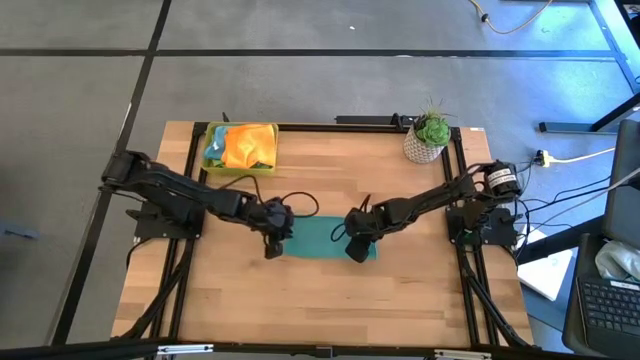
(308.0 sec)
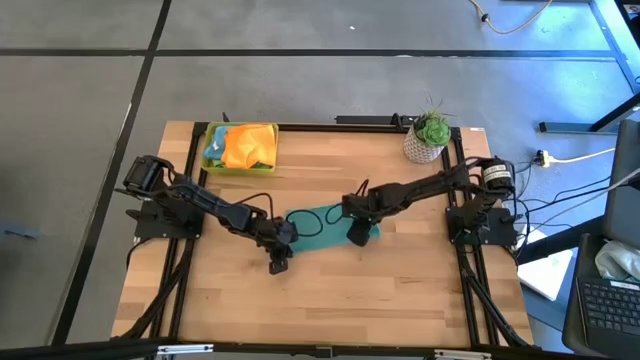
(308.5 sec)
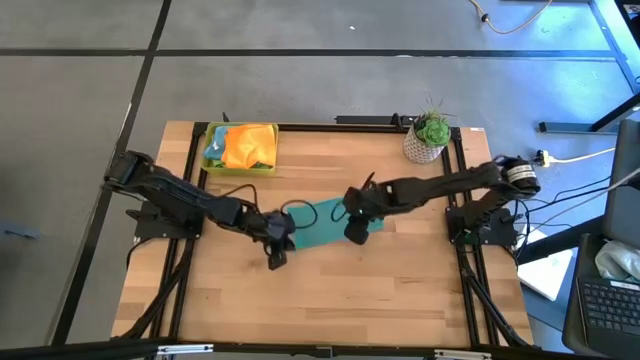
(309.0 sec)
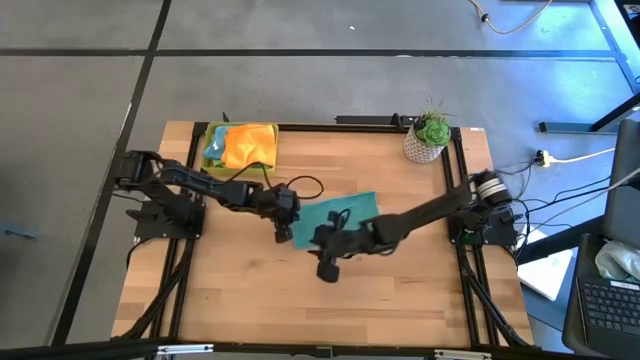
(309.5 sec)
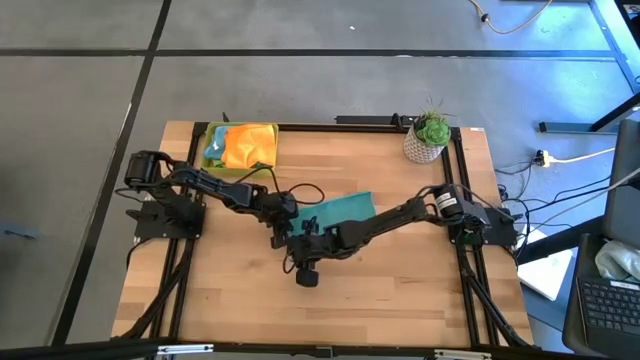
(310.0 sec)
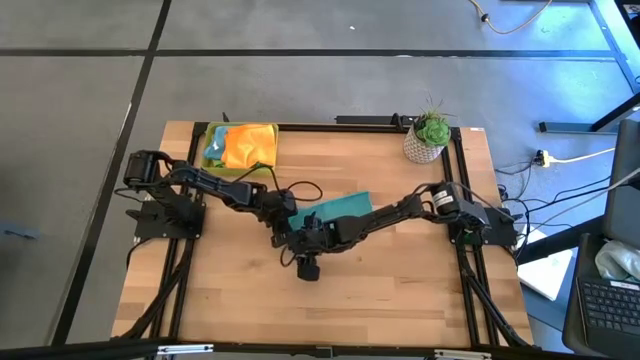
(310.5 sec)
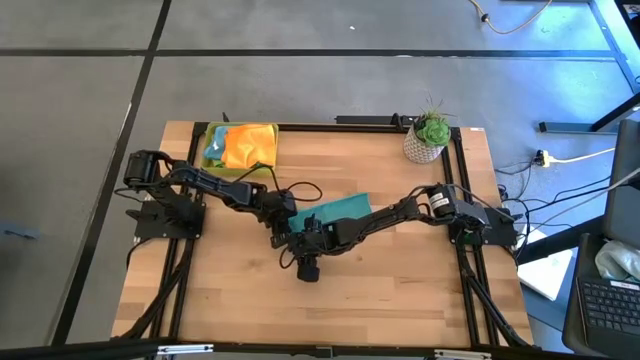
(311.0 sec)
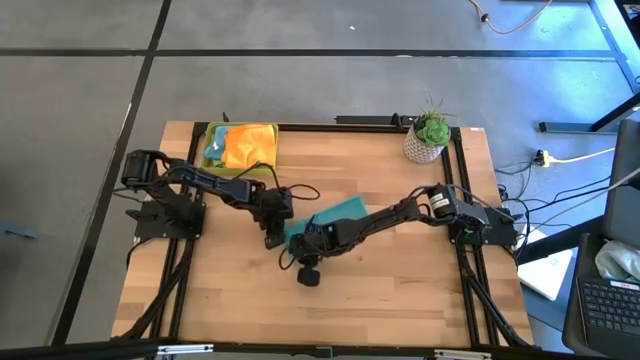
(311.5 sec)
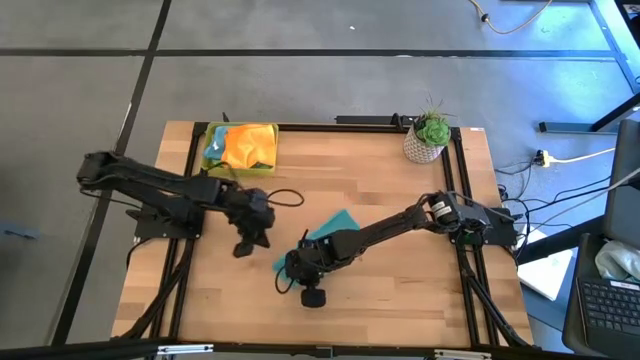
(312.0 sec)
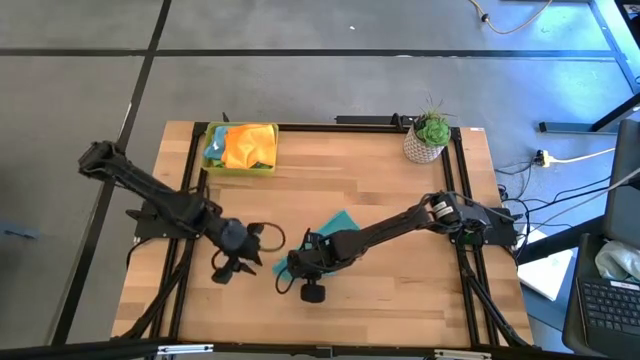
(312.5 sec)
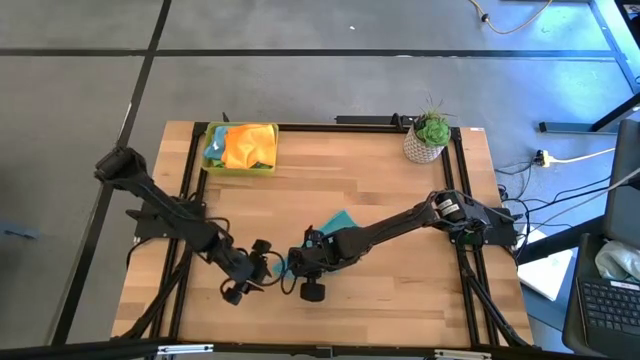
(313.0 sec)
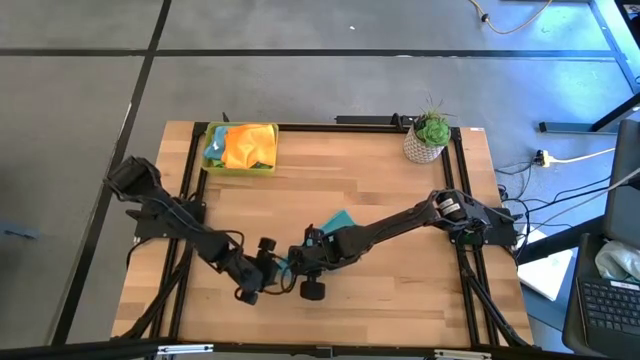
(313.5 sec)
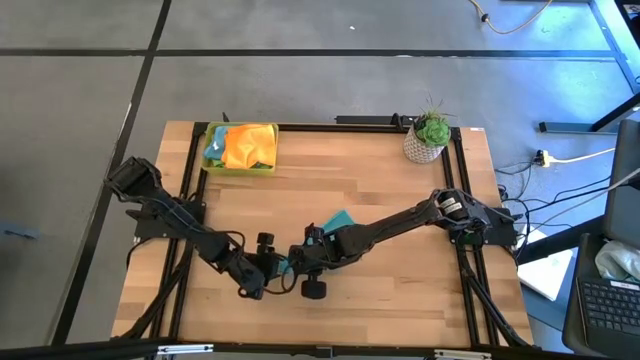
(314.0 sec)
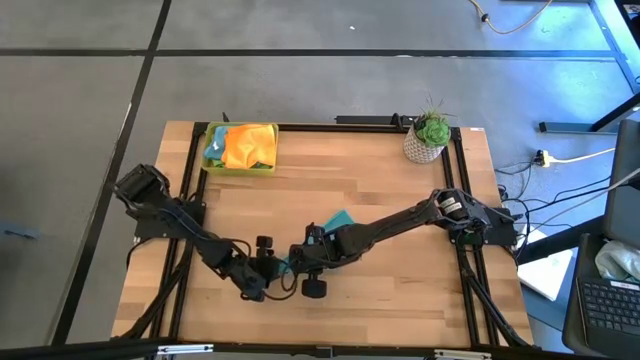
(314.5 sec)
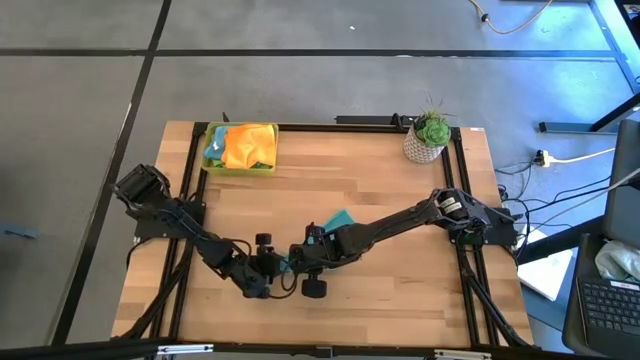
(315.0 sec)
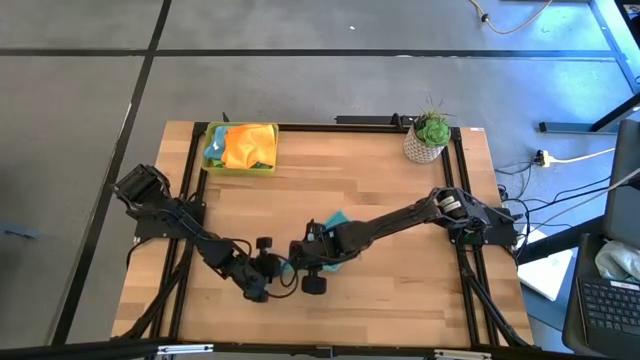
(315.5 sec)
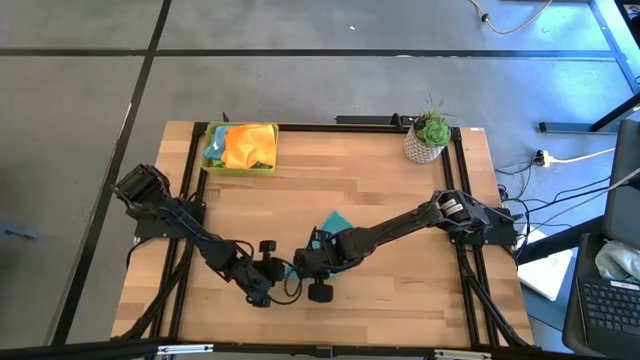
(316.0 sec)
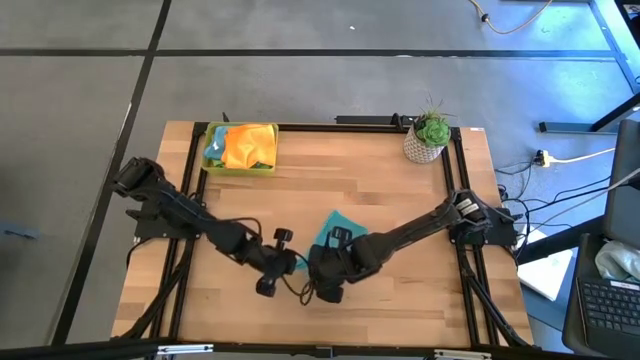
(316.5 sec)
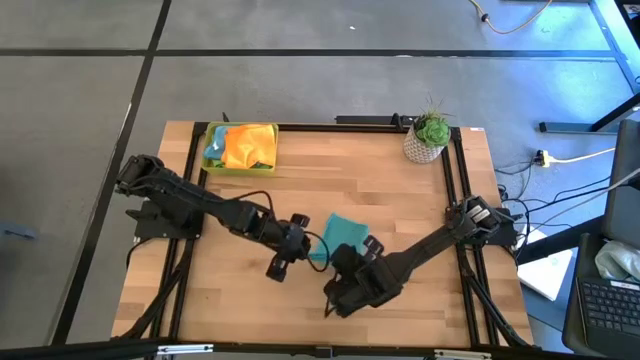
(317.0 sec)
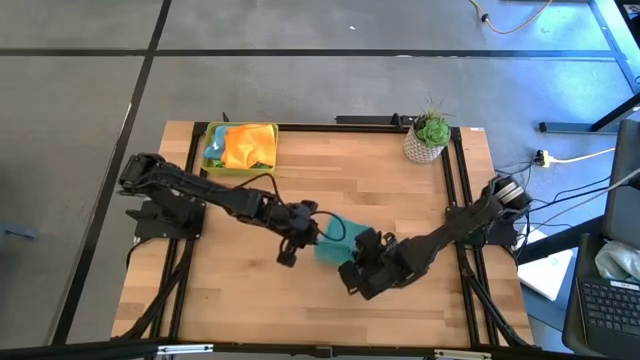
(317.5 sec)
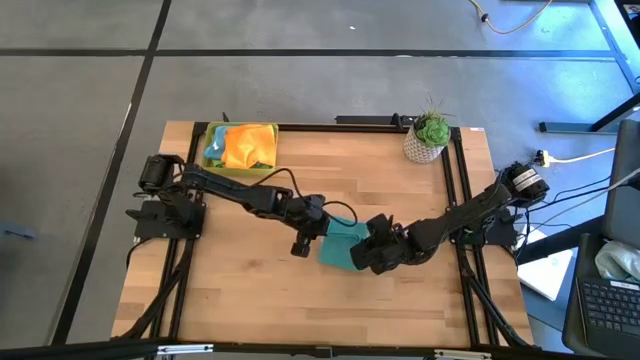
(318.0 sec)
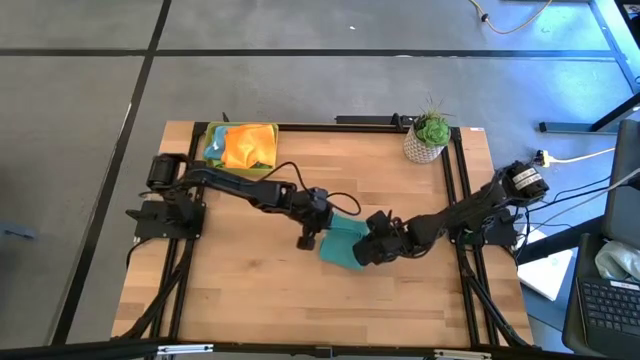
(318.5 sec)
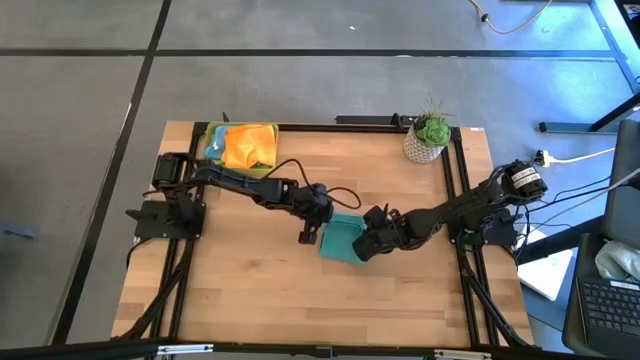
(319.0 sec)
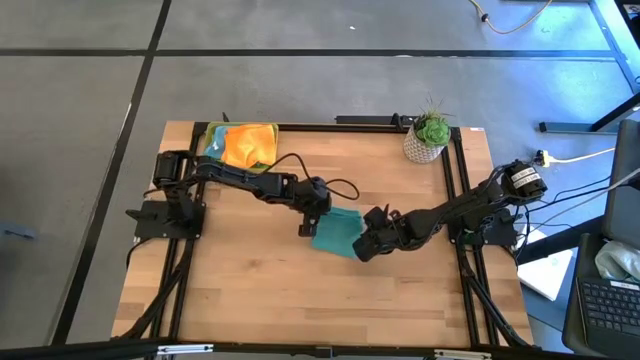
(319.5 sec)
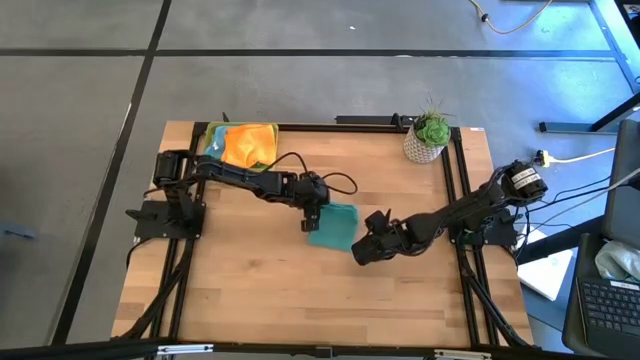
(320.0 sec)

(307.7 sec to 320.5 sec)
Task: Fold microfiber towels
Fold the blue towel

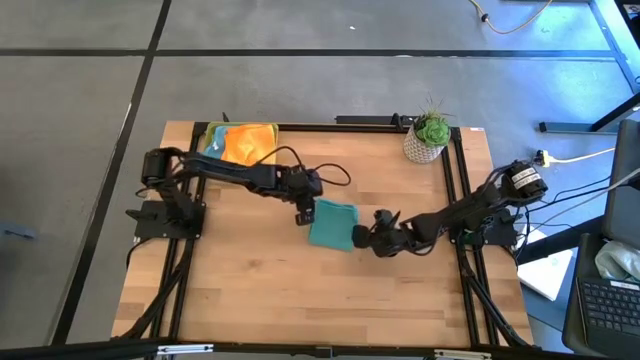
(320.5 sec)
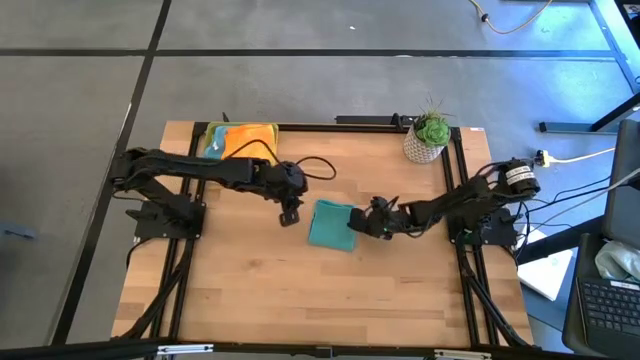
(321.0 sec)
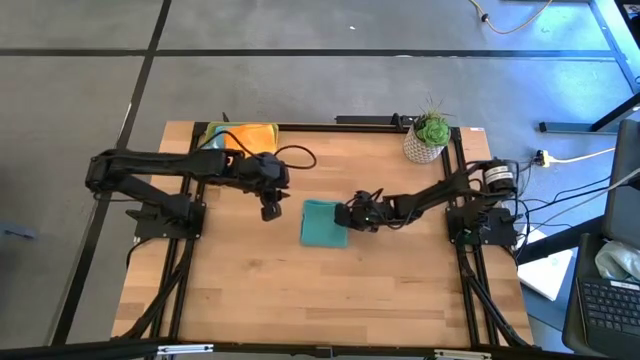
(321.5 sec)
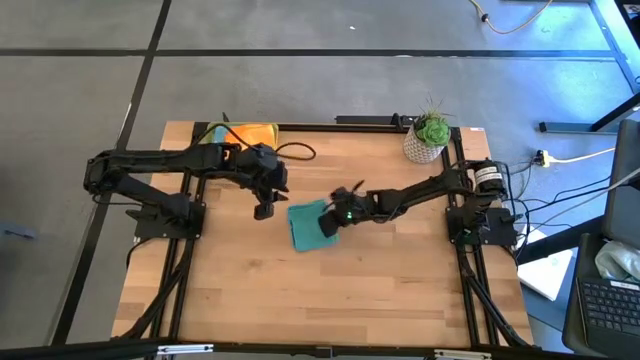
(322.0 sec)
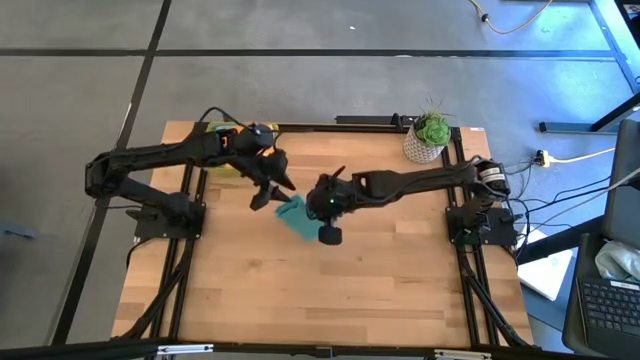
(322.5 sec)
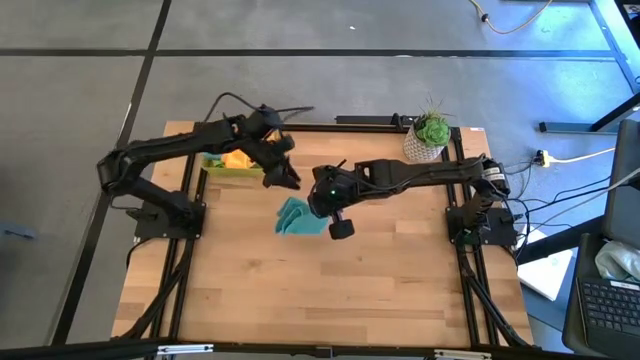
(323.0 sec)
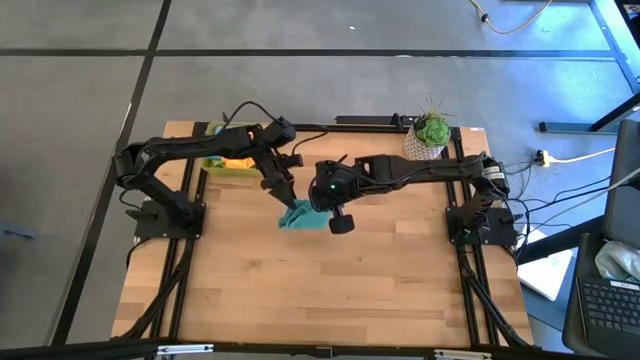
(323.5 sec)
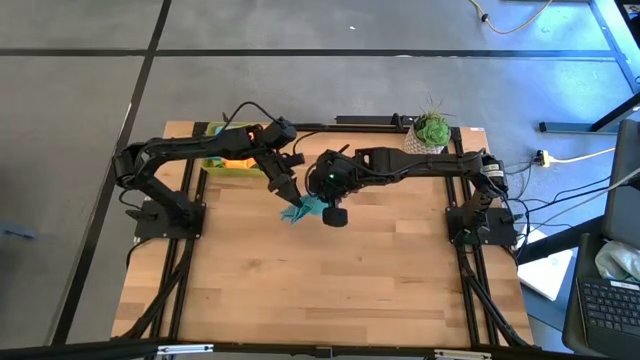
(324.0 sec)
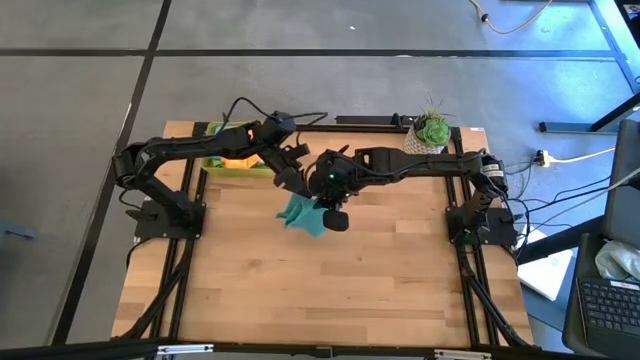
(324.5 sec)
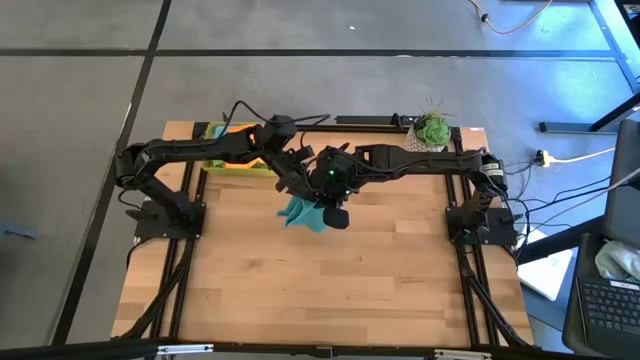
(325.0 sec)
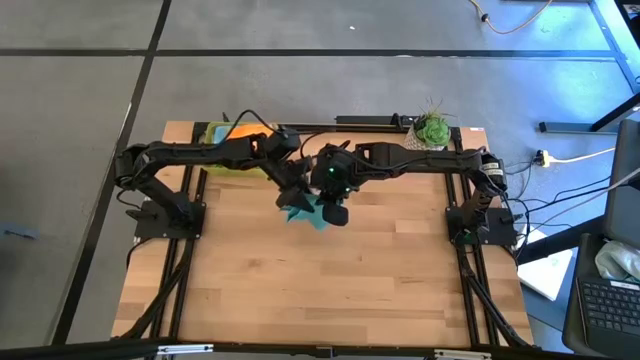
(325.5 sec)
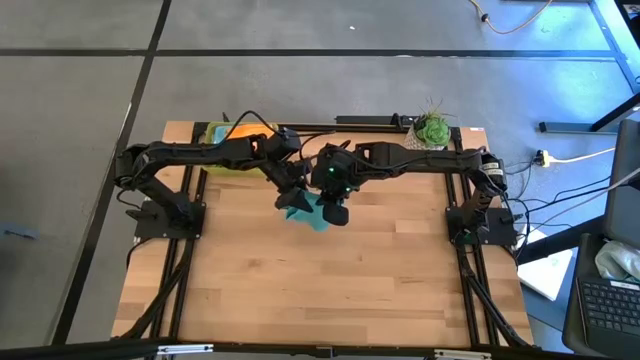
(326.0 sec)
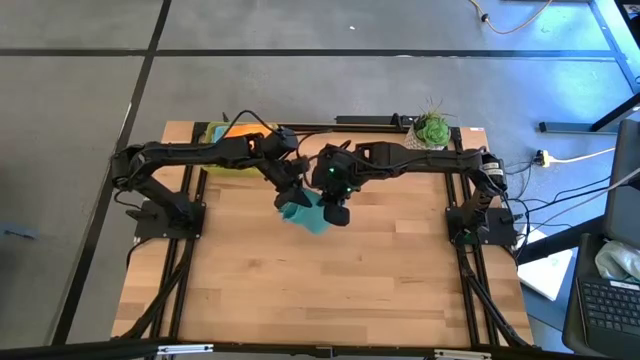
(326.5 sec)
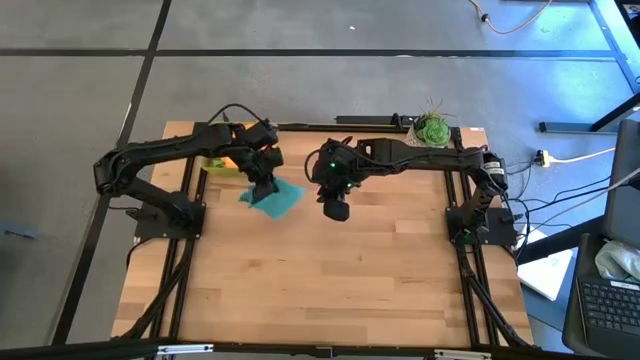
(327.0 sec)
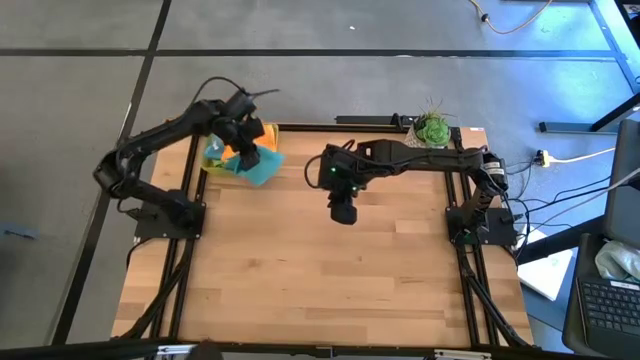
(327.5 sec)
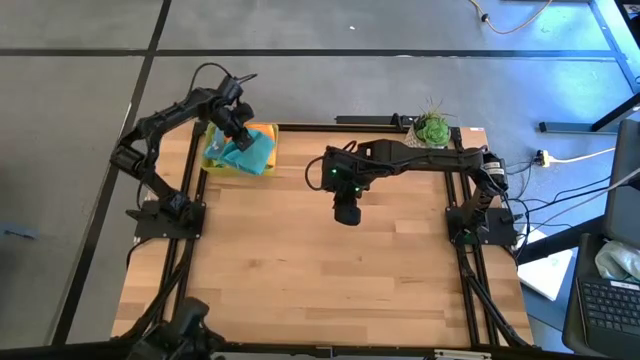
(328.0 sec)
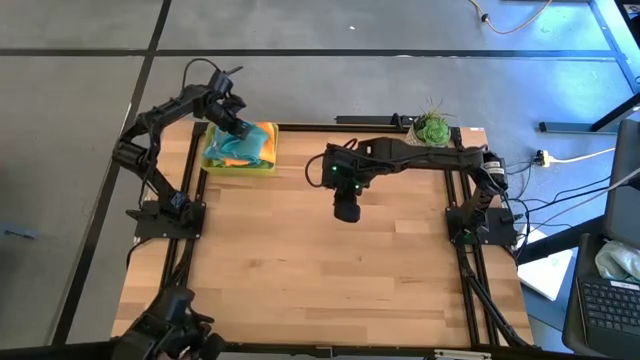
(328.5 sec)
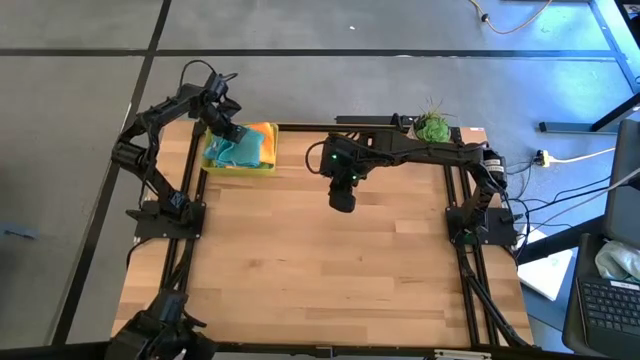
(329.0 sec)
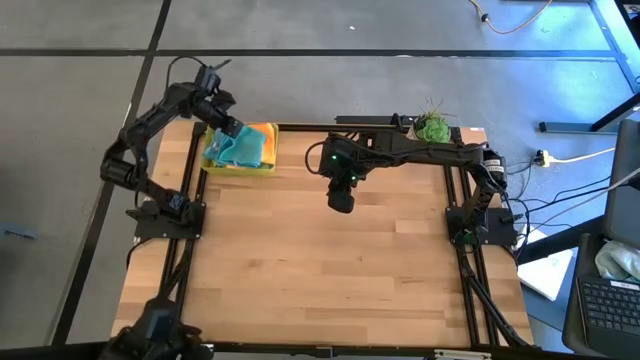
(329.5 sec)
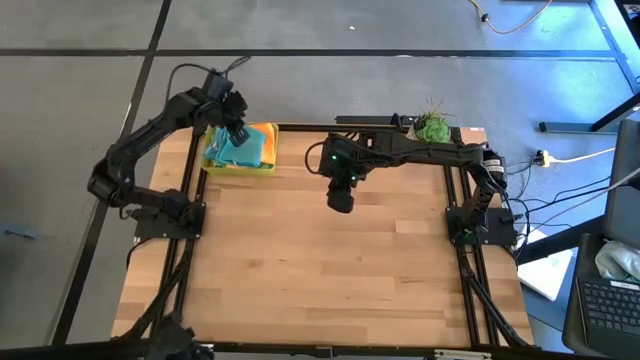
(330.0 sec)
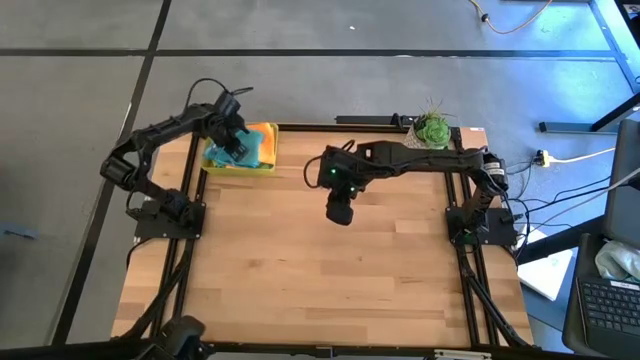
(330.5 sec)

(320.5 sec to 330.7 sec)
Put the folded blue towel into the yellow bin
